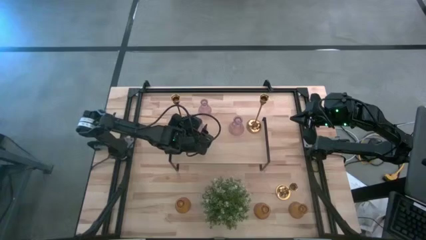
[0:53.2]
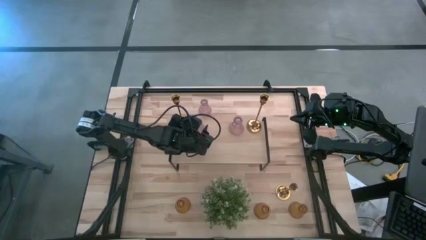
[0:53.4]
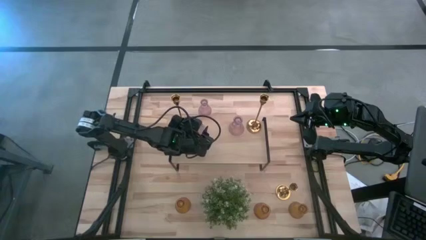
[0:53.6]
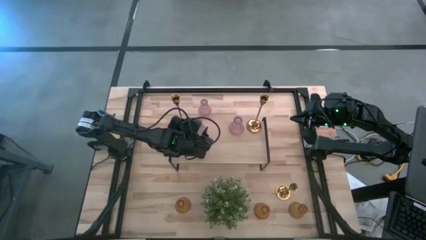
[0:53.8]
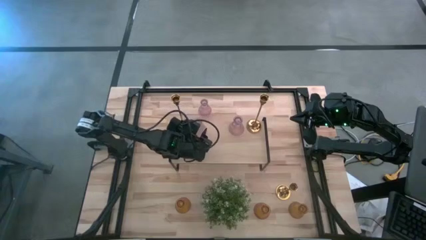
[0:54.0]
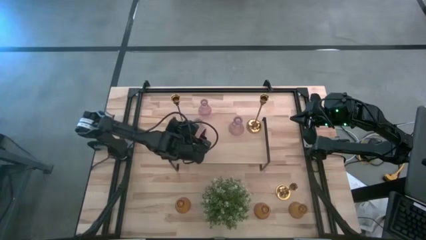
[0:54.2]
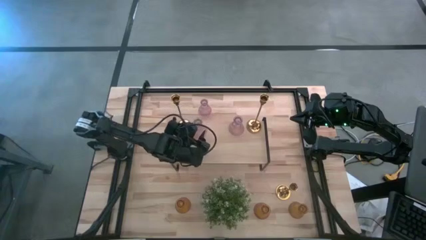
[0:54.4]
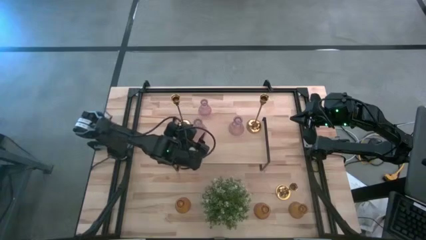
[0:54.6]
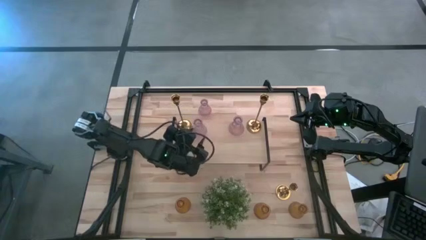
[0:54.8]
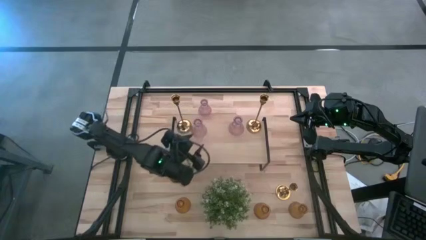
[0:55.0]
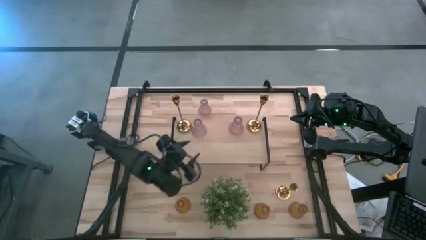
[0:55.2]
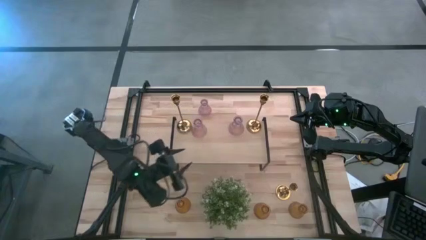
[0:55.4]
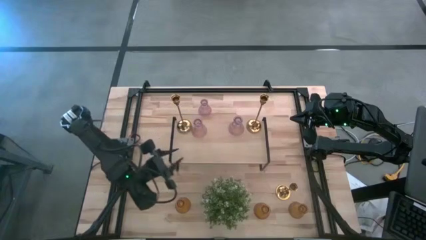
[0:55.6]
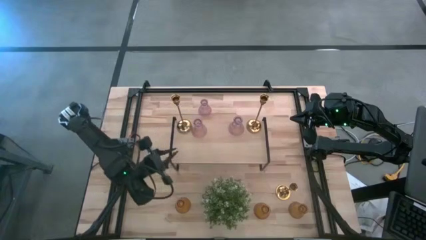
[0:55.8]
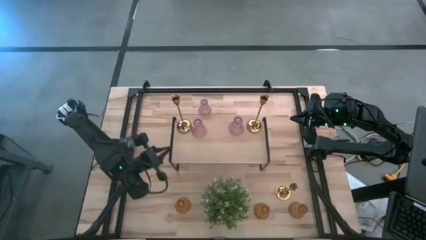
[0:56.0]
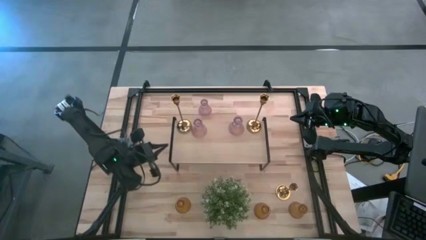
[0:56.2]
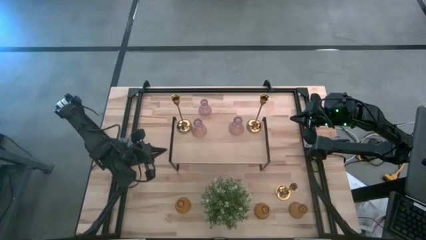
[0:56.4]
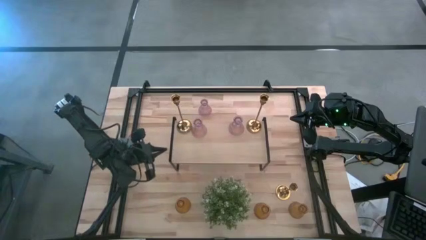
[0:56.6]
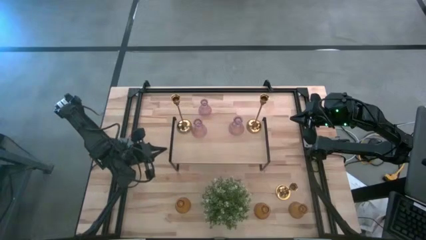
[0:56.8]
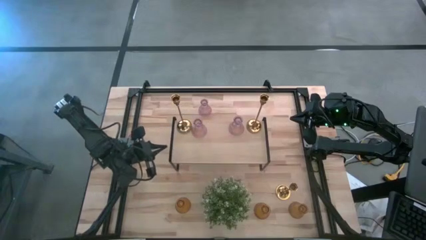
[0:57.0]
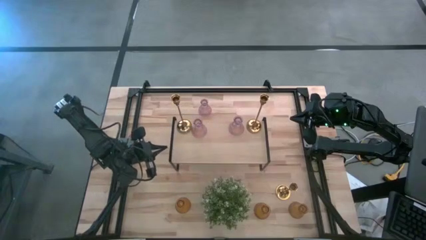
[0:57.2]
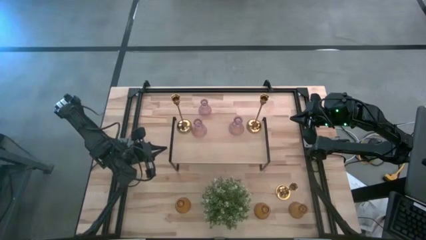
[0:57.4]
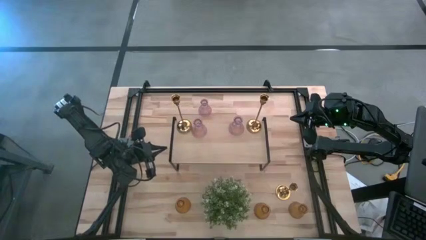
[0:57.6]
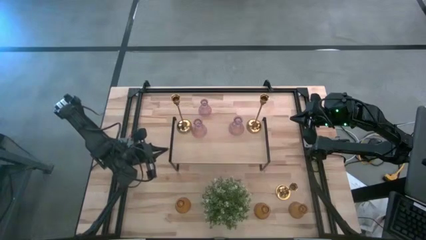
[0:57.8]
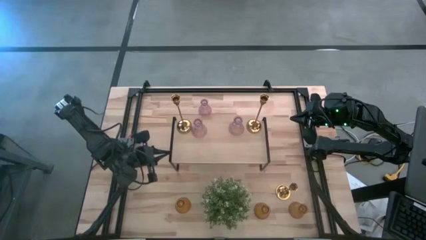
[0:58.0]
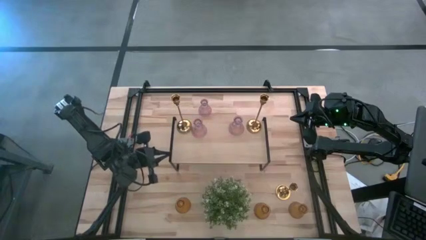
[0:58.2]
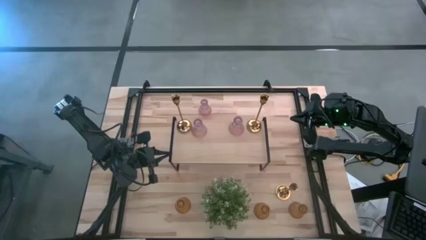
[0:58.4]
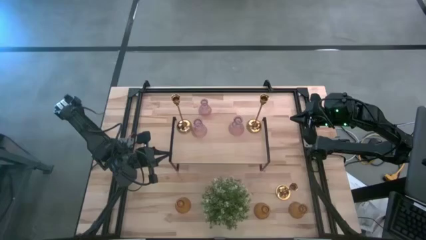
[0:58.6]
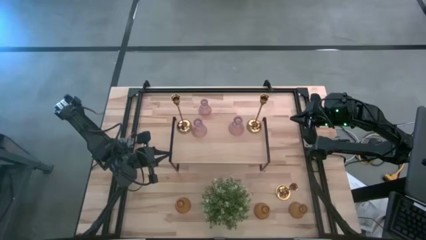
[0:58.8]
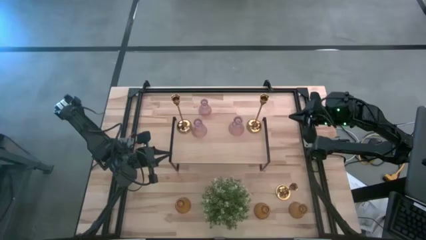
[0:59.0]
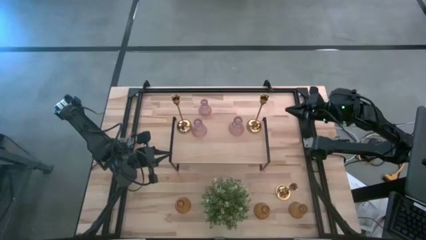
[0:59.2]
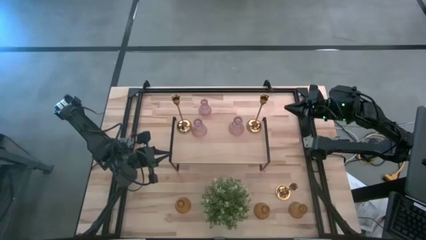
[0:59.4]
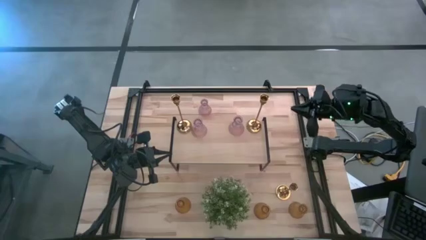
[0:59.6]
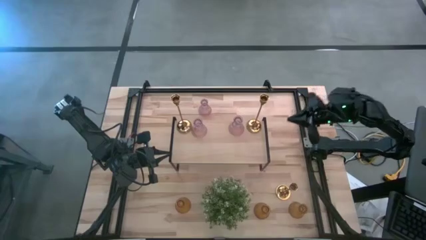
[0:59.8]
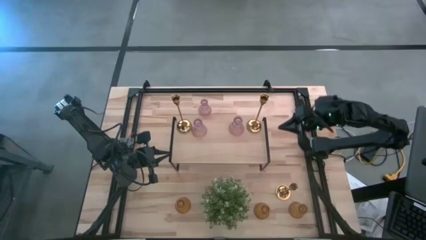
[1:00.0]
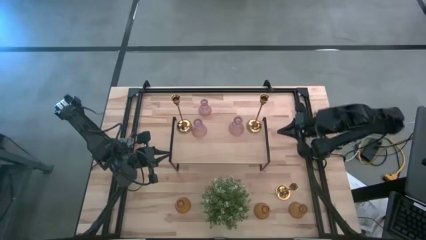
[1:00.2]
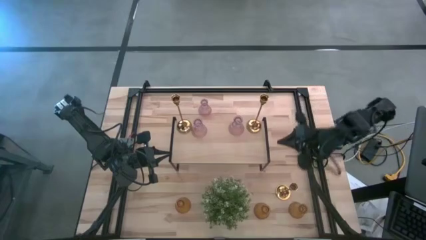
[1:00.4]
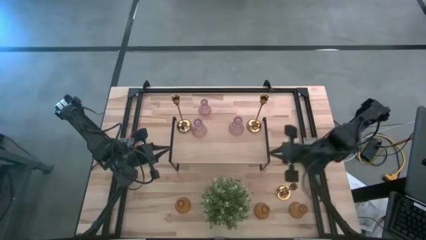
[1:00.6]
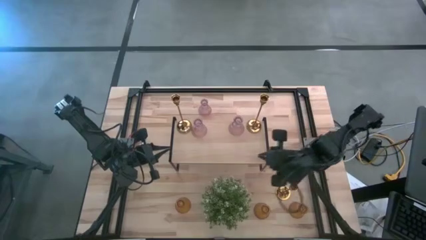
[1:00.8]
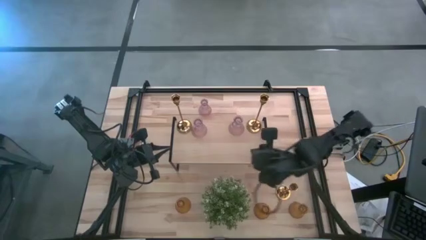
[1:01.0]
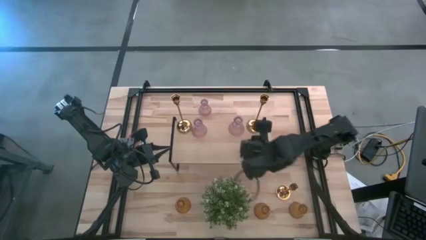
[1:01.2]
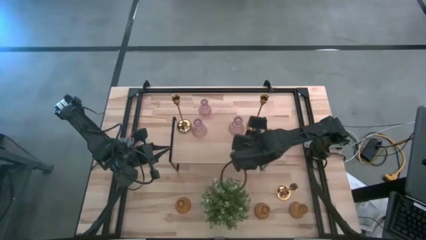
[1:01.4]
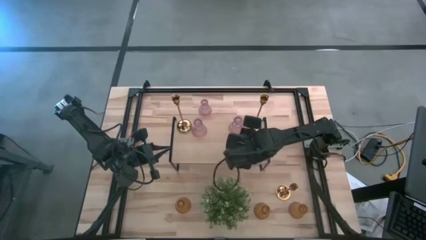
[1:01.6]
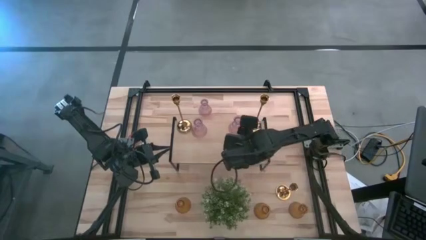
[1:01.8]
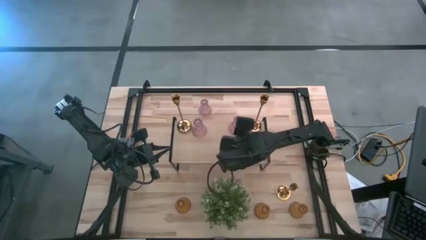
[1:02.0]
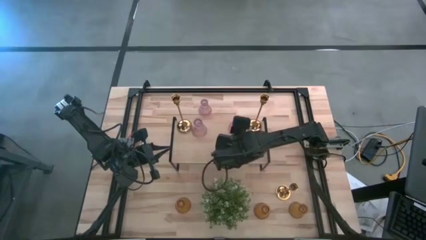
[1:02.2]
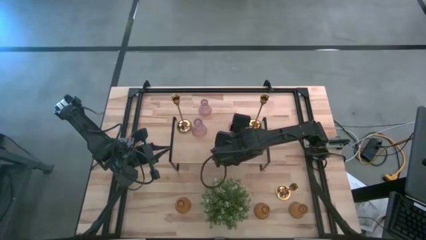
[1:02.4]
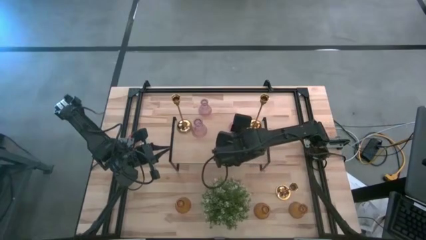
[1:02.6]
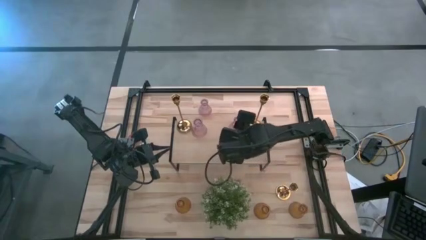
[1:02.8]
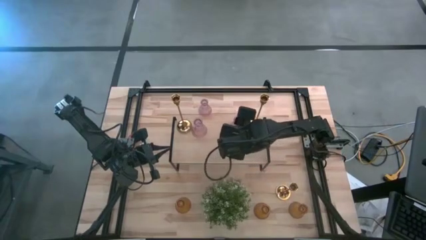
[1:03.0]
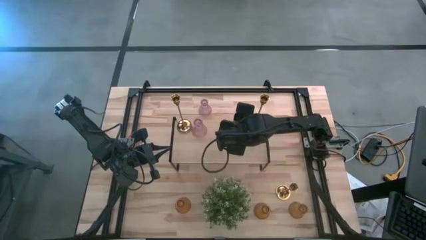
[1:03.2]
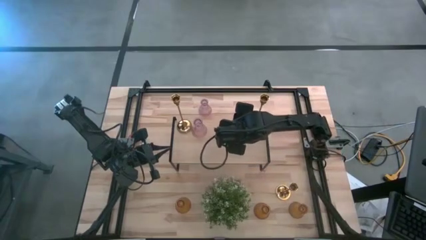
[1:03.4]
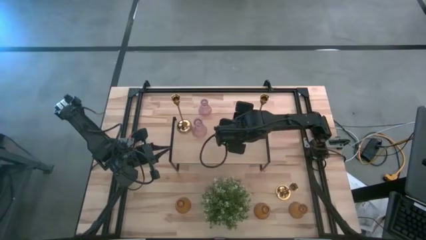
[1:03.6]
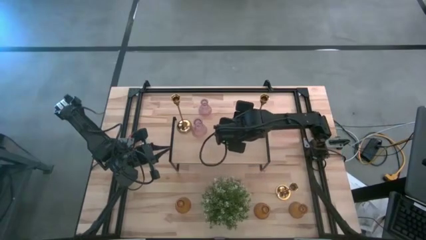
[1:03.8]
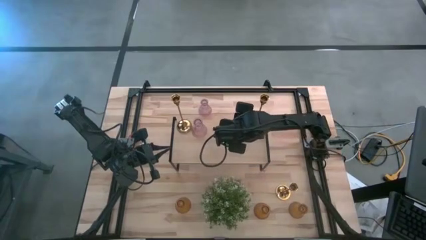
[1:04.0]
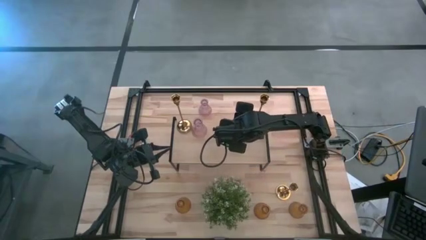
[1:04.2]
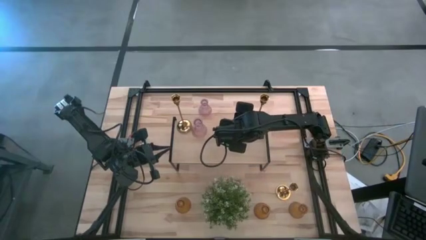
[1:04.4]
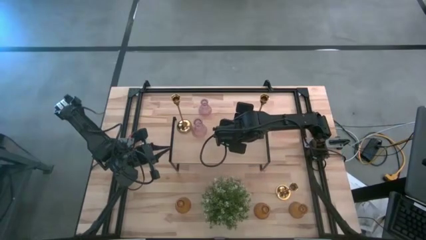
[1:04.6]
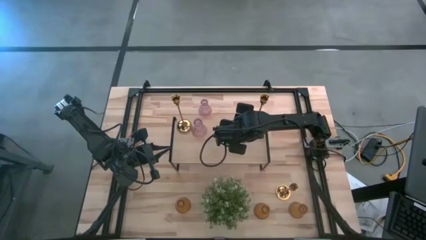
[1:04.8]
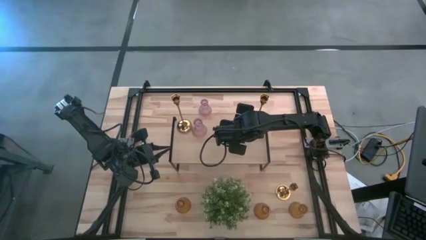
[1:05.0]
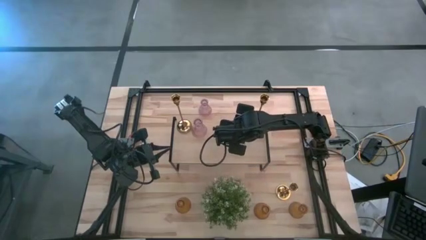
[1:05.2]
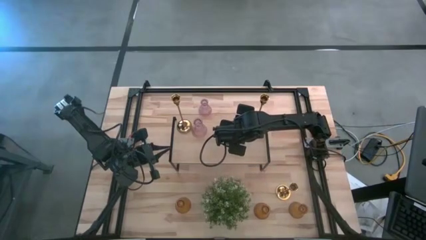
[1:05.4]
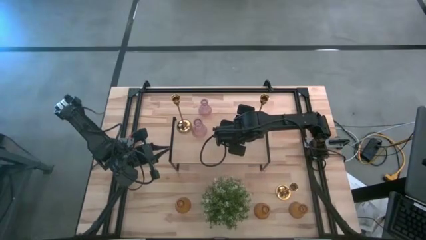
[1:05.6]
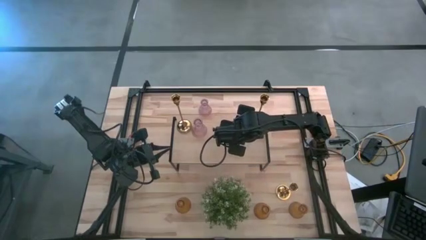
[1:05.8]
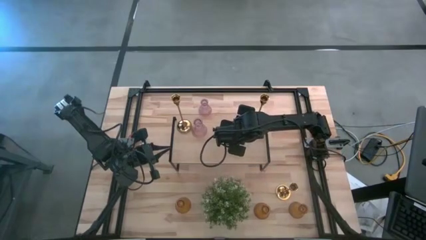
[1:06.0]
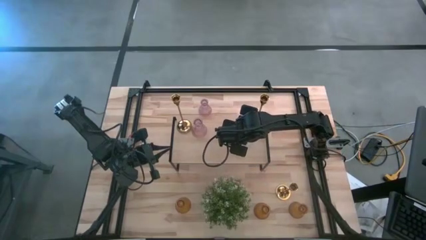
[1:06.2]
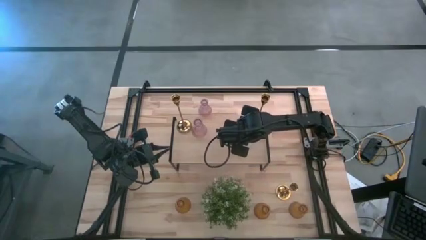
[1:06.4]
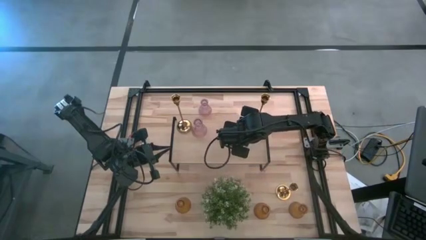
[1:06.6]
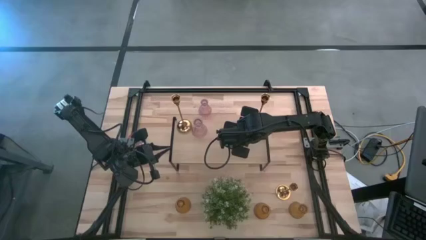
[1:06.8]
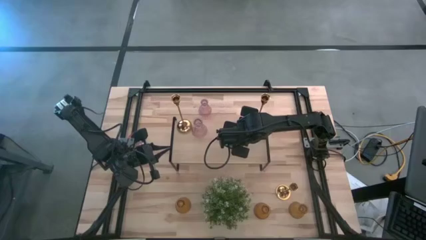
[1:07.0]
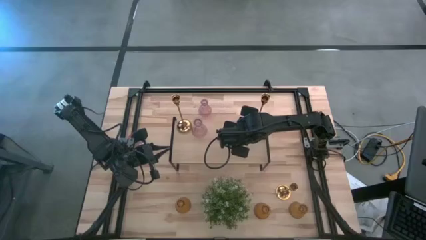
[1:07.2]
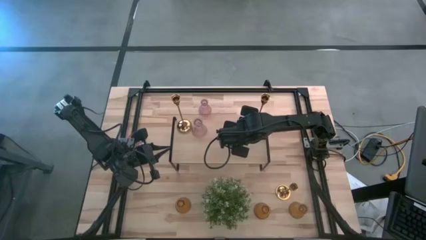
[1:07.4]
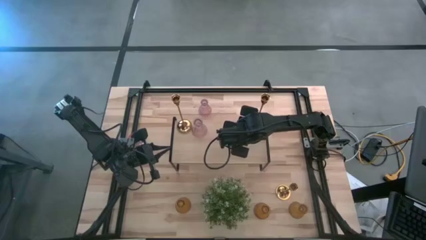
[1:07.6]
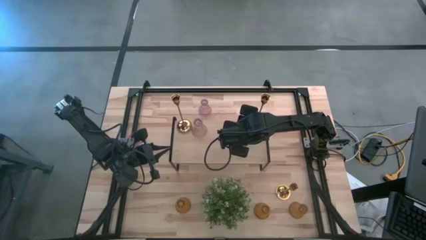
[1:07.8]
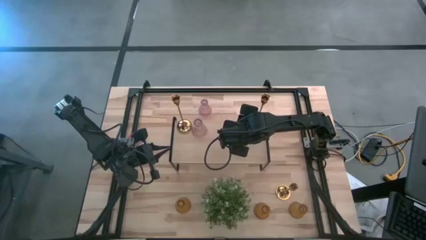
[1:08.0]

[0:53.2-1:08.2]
Task: Pick & Place candle stick holders
Adjust the right pink vase on the shelf
